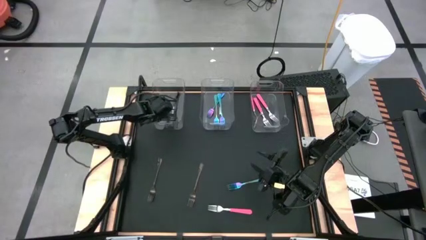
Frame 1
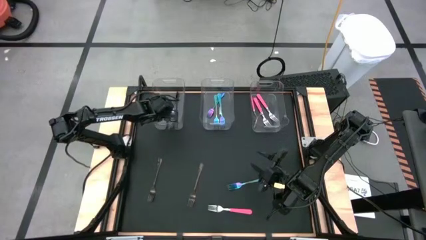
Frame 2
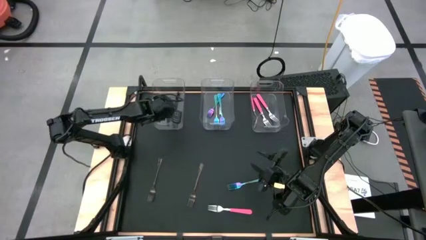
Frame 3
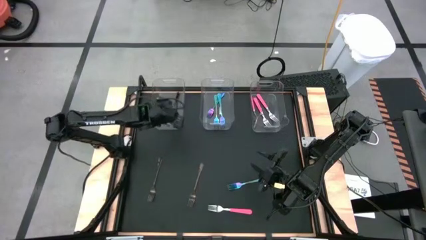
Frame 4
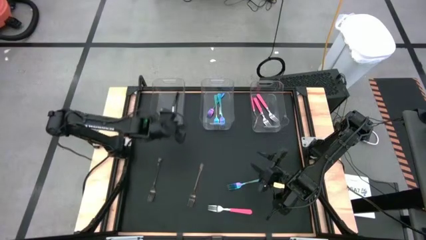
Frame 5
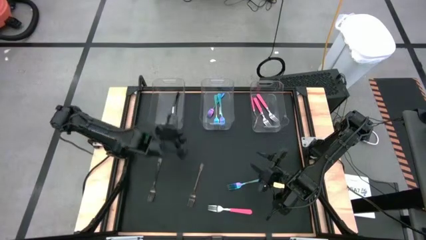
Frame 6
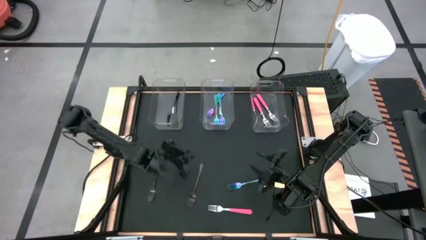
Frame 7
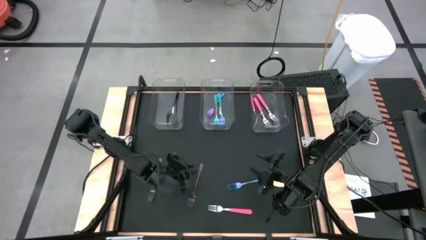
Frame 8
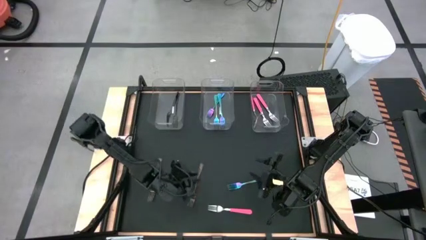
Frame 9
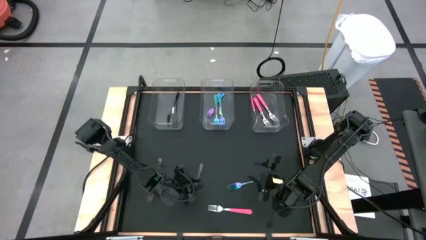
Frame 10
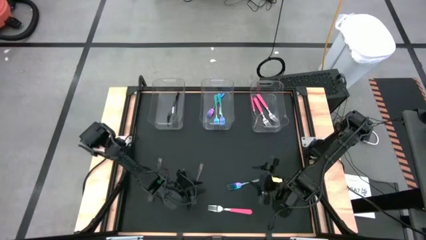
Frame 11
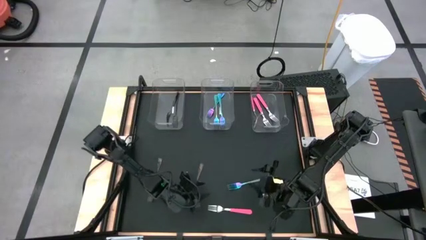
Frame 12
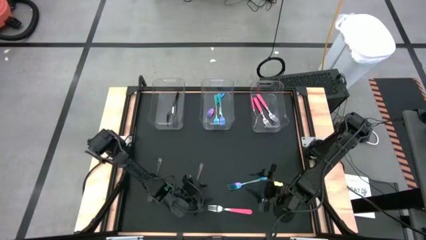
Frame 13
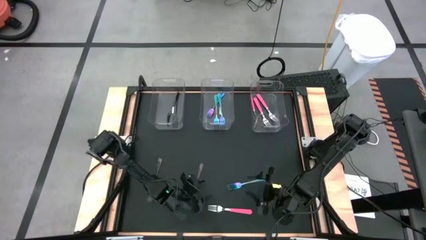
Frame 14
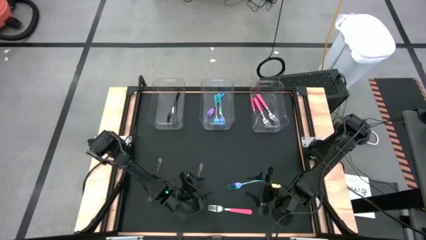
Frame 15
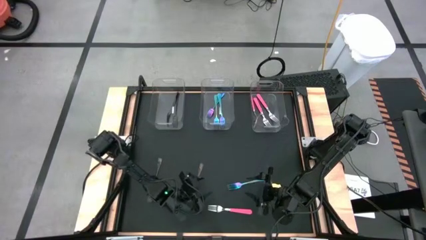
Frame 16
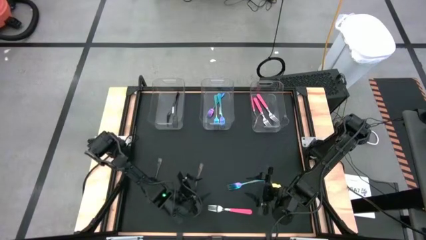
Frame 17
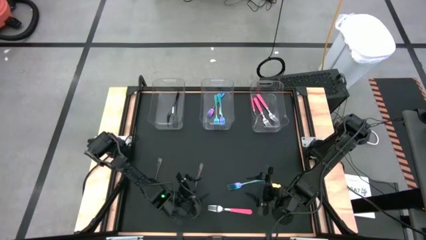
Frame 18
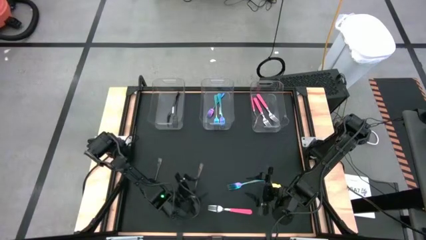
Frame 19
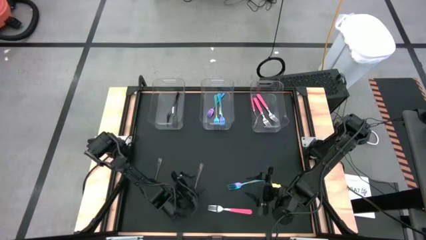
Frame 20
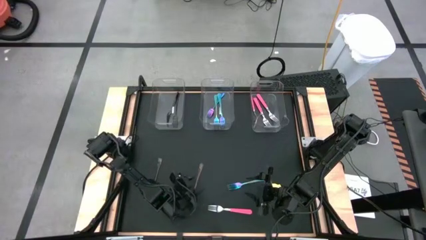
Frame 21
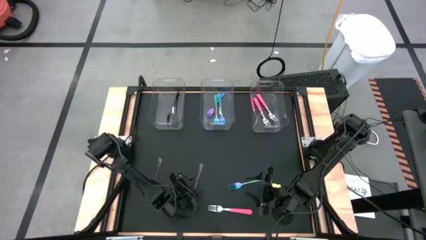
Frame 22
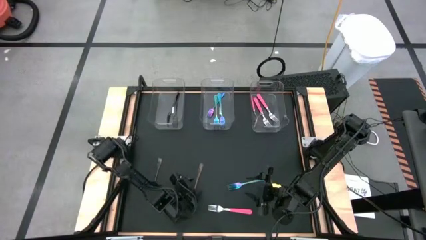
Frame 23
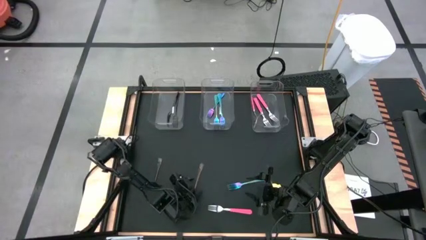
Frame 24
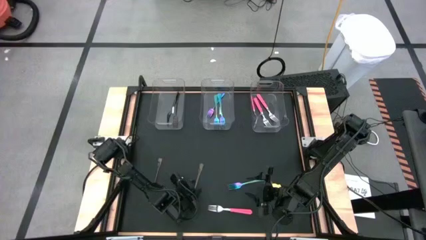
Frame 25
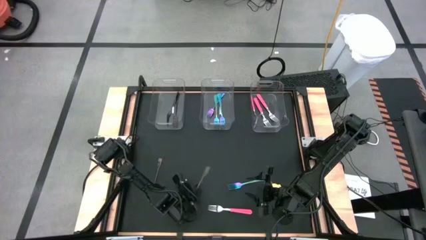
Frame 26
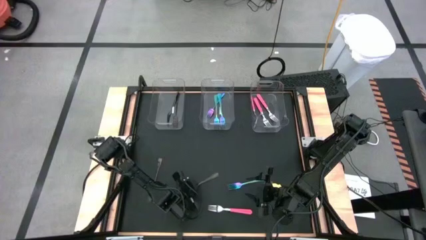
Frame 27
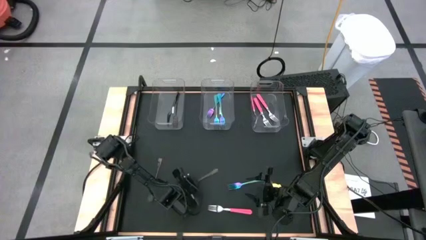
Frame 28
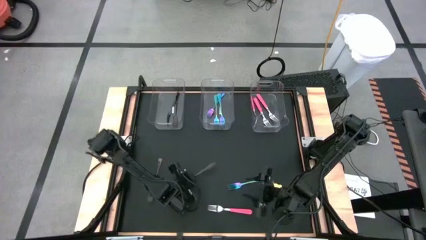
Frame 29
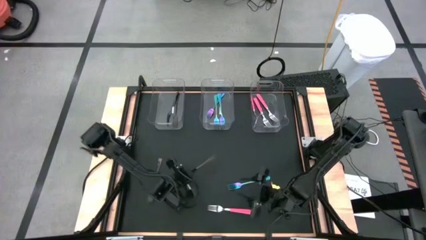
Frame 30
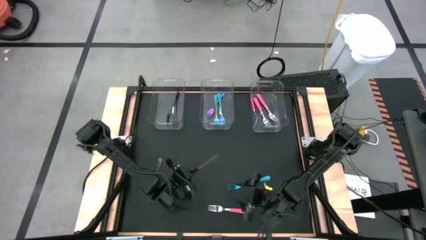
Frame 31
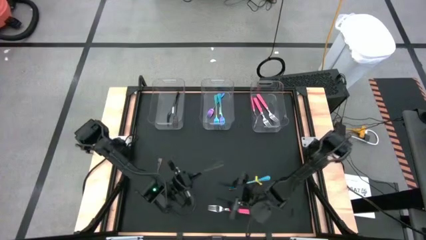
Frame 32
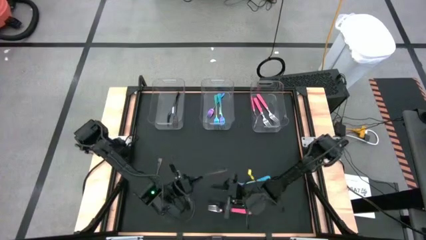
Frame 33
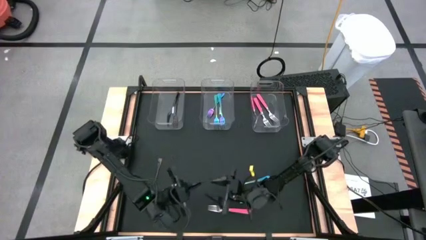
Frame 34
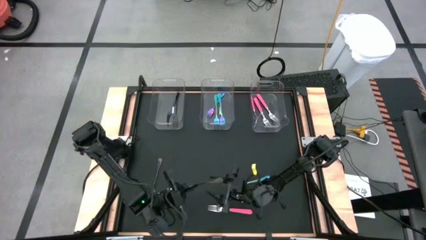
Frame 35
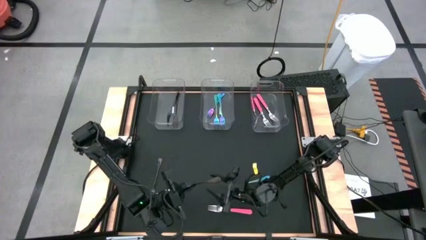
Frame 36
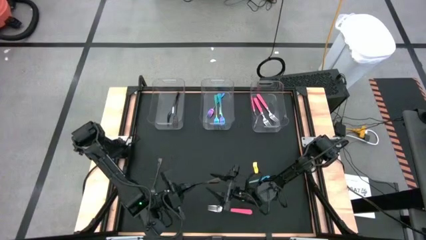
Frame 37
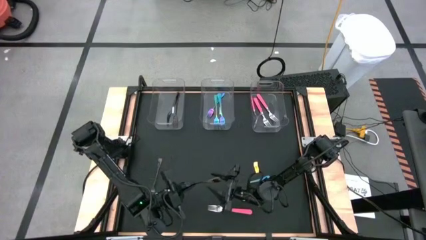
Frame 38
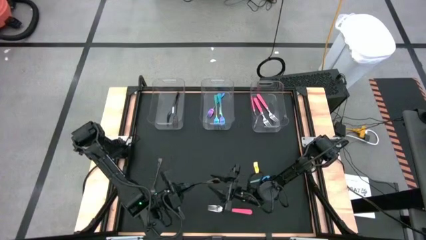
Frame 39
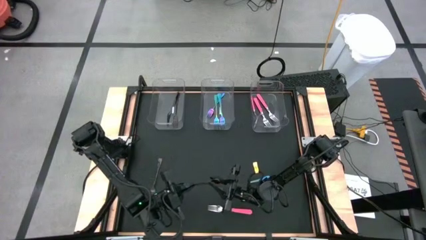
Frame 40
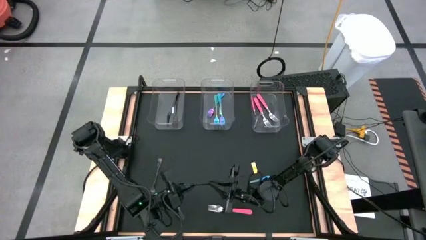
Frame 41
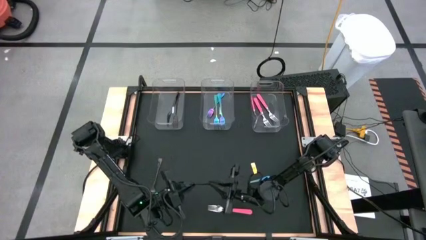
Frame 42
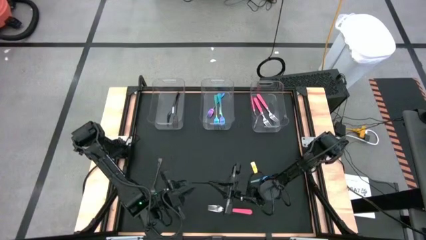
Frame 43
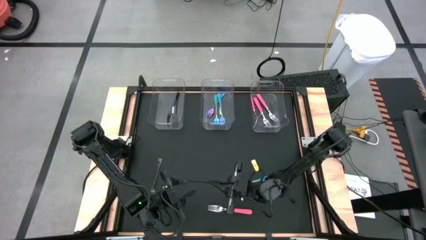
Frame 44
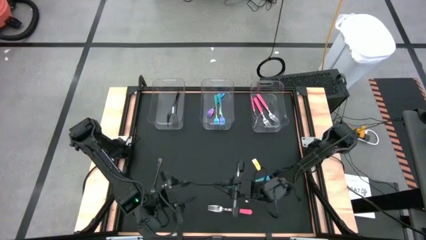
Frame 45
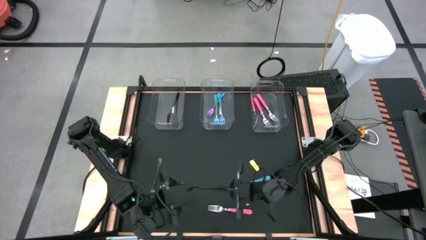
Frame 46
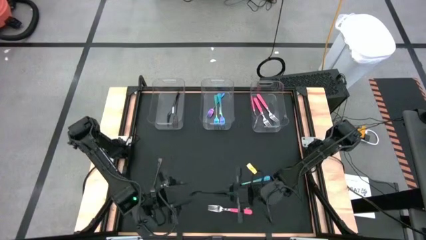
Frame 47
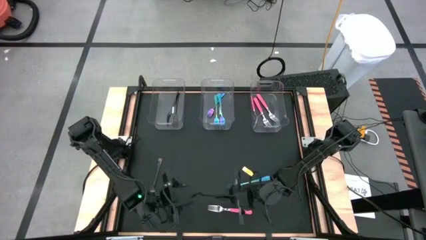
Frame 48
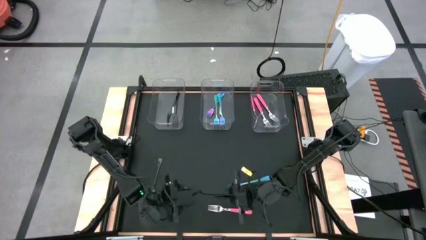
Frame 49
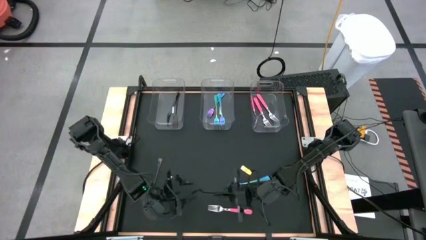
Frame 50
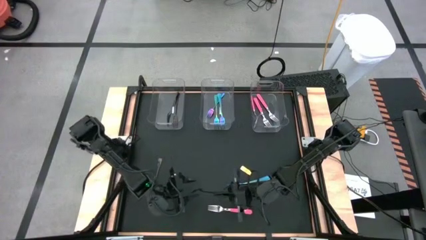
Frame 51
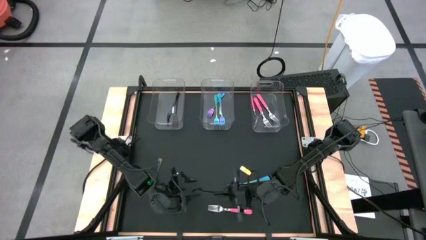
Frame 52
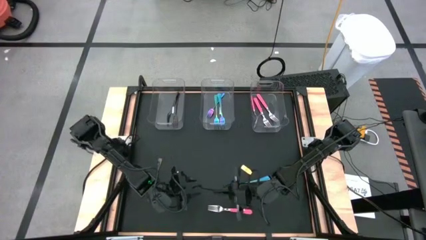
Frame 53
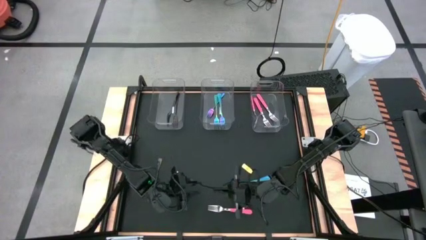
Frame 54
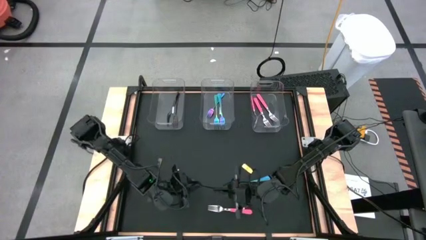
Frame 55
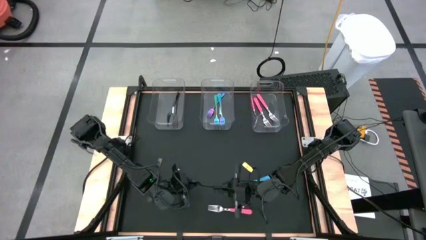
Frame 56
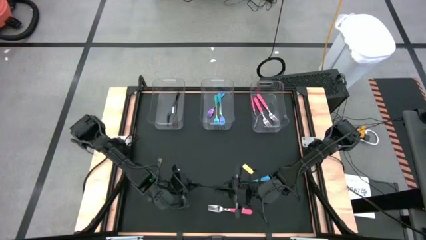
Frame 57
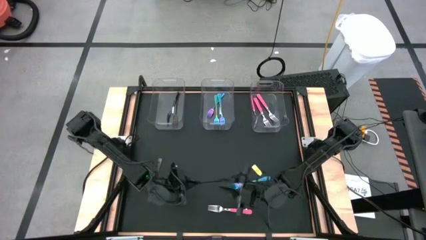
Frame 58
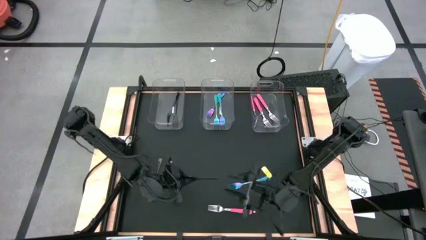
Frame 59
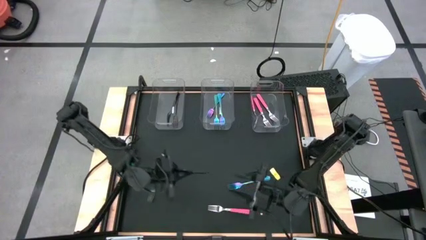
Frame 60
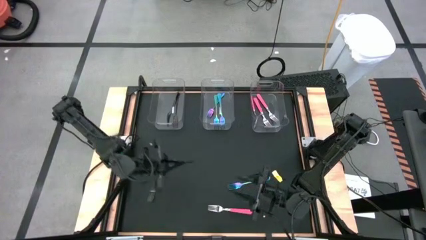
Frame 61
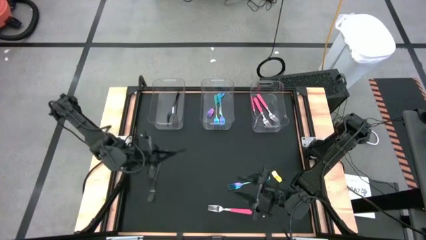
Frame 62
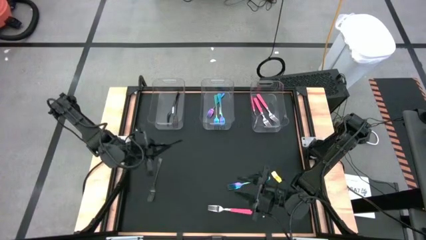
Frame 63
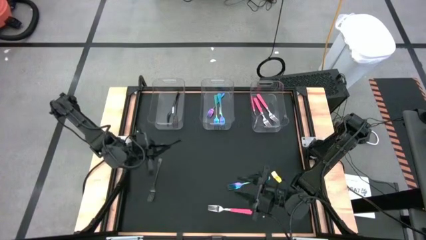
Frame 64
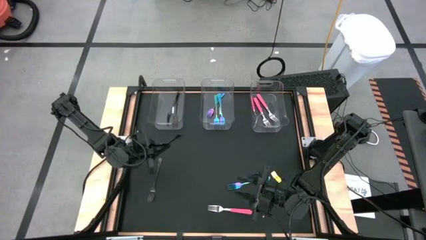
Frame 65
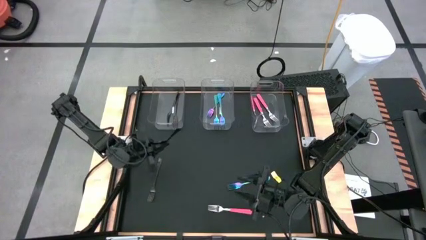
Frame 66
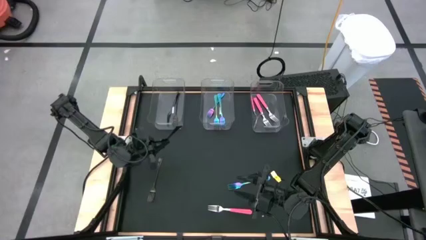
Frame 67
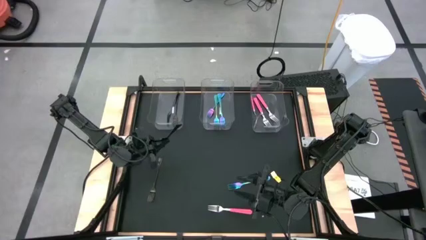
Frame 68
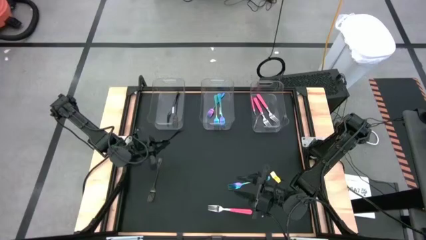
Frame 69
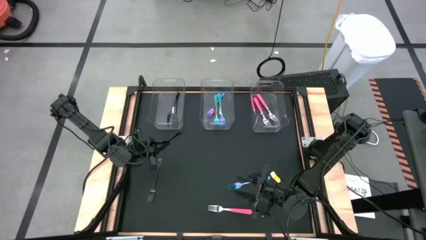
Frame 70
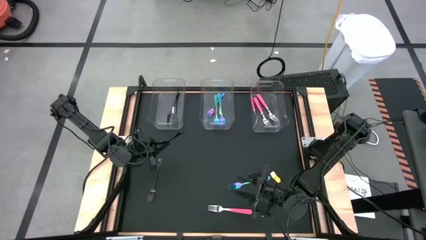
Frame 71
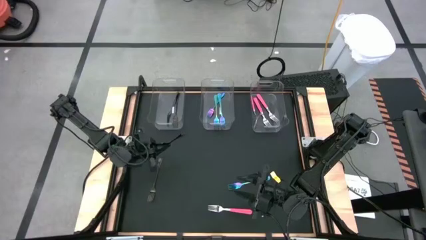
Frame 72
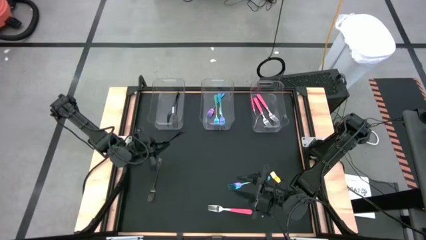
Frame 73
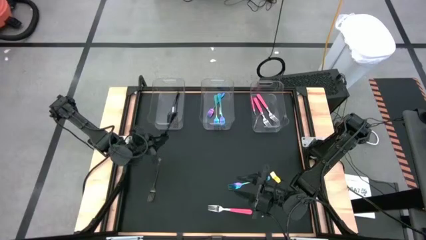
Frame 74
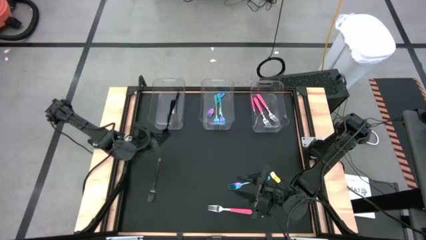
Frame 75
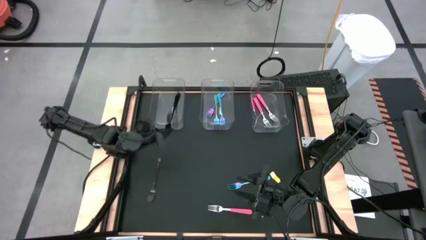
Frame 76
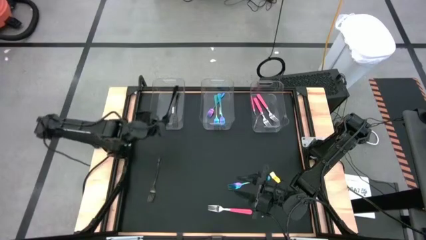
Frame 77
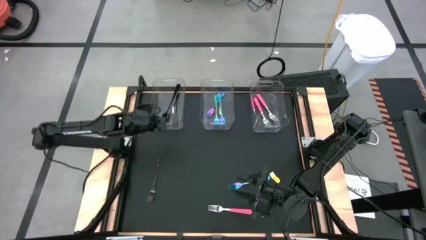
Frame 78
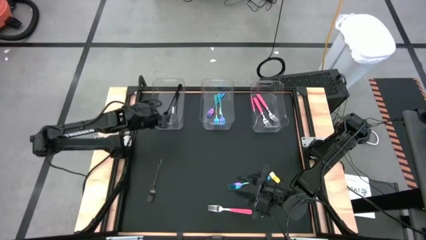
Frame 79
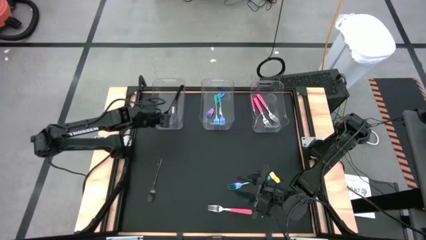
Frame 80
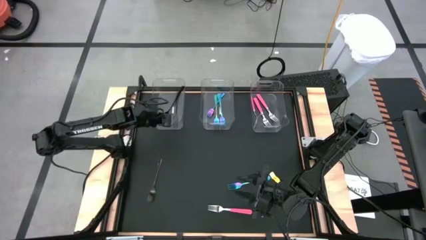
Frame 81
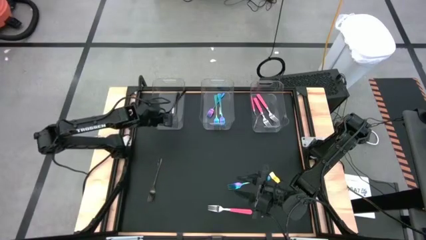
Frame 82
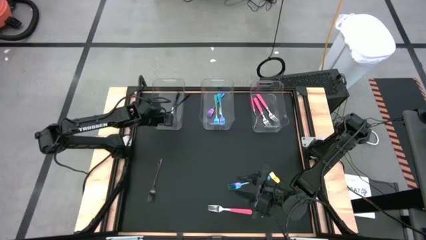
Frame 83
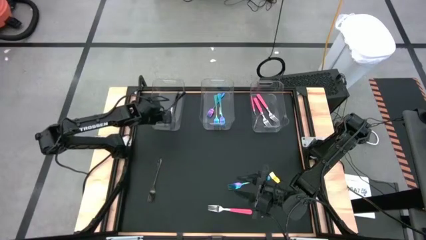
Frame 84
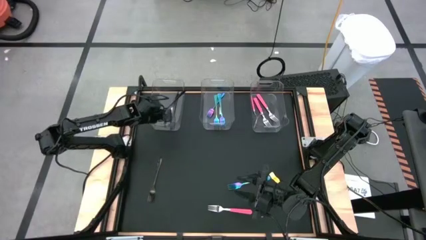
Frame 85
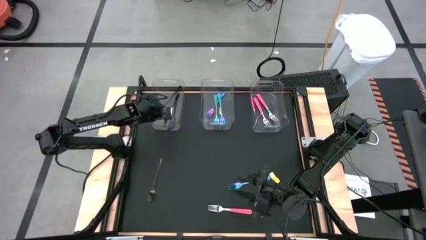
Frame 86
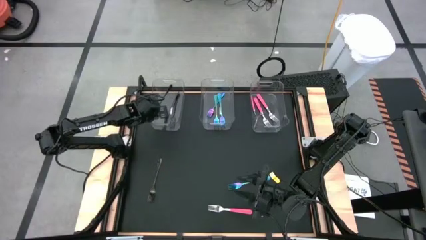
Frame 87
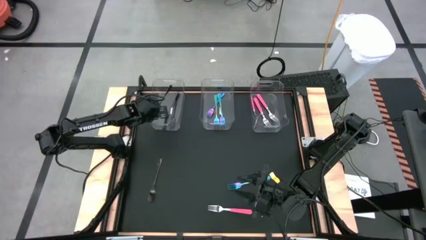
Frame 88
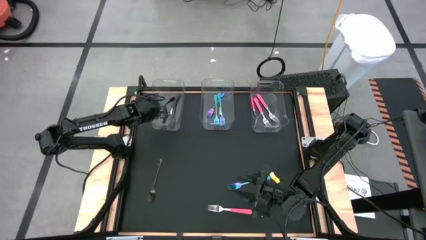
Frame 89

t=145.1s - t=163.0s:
Task: Sort silverware by color (type)
Put the black fork into the left transparent bin
